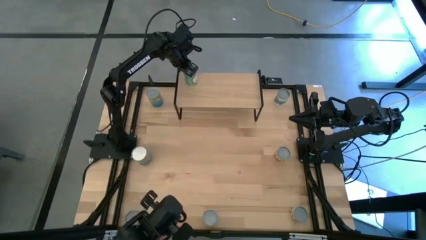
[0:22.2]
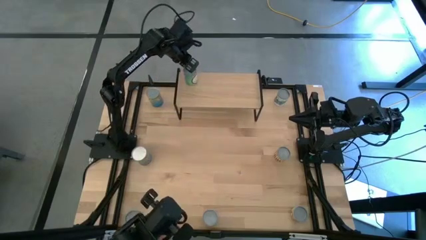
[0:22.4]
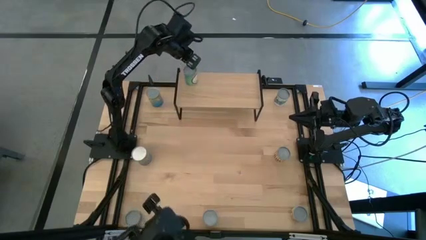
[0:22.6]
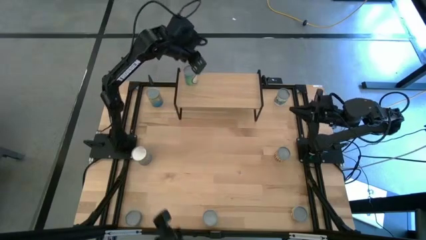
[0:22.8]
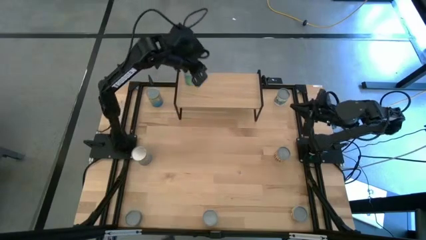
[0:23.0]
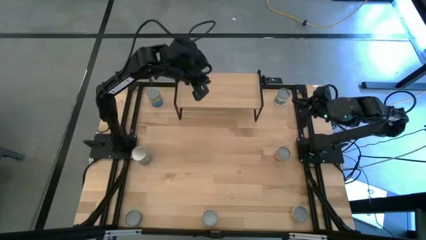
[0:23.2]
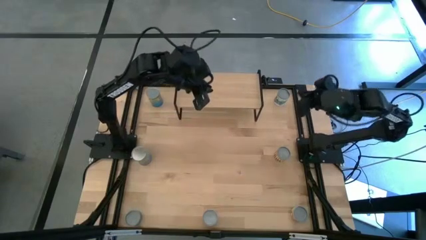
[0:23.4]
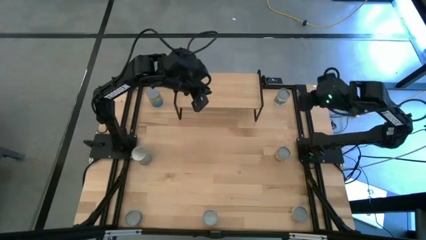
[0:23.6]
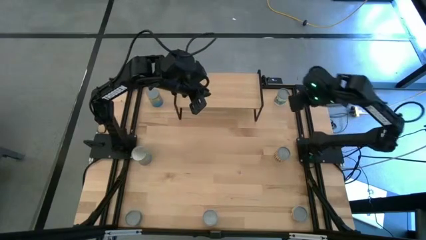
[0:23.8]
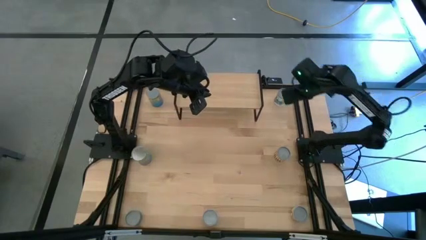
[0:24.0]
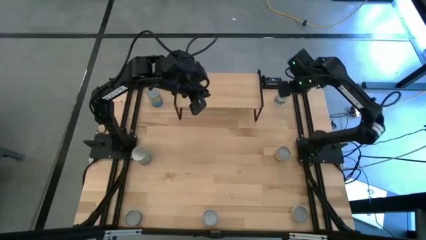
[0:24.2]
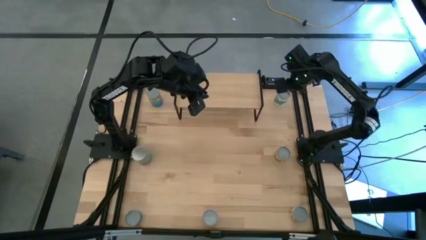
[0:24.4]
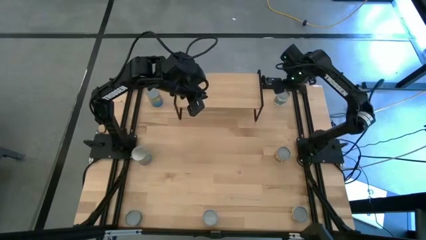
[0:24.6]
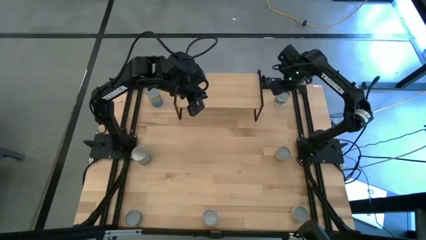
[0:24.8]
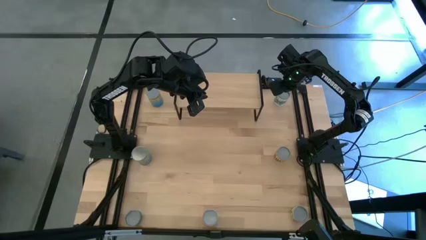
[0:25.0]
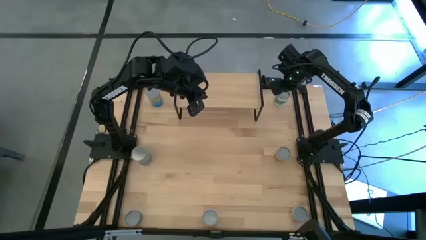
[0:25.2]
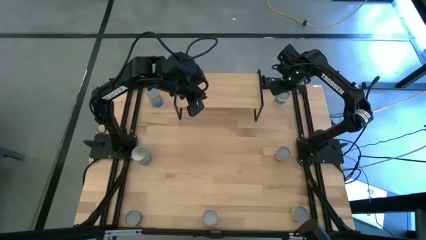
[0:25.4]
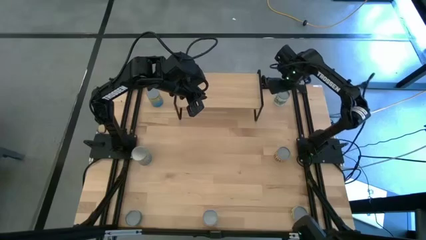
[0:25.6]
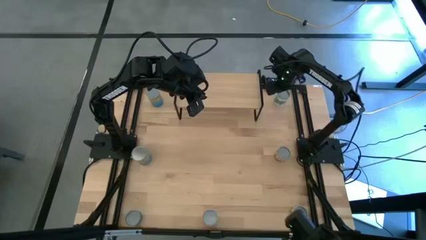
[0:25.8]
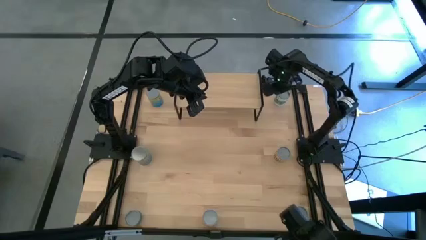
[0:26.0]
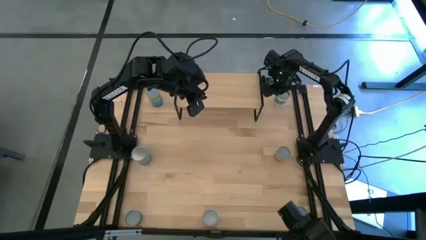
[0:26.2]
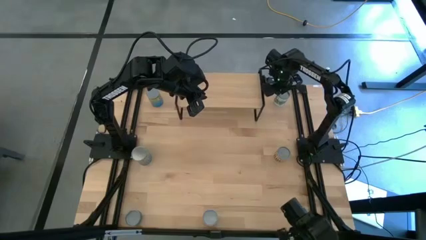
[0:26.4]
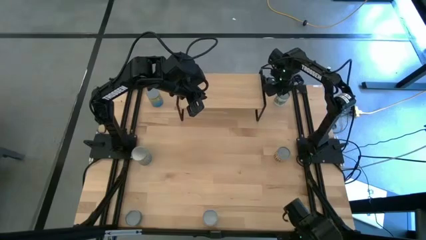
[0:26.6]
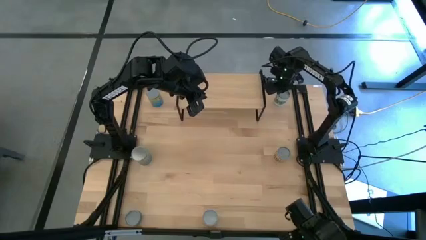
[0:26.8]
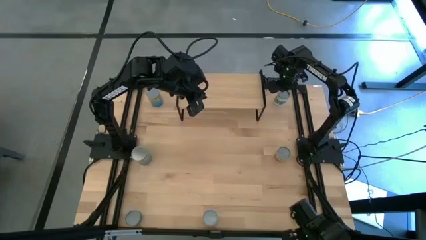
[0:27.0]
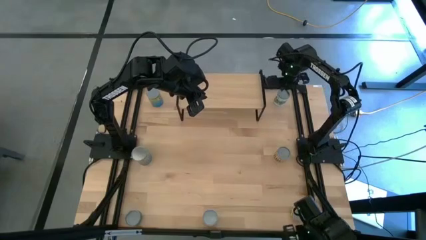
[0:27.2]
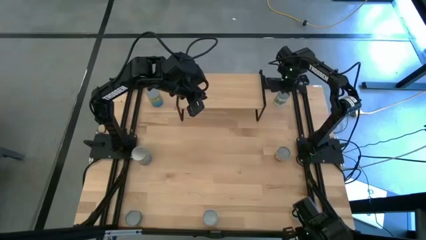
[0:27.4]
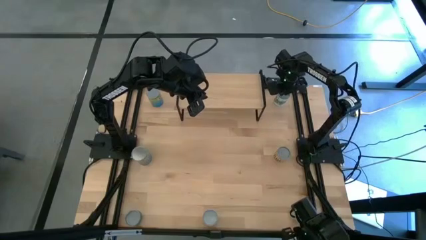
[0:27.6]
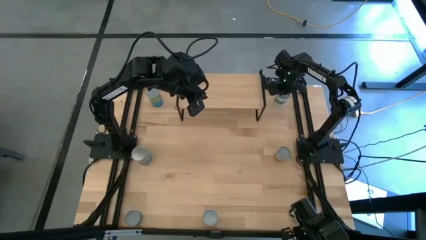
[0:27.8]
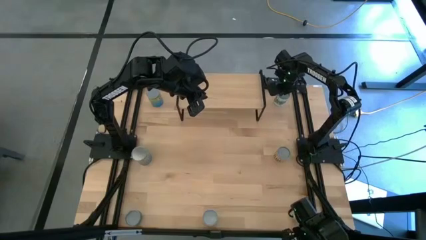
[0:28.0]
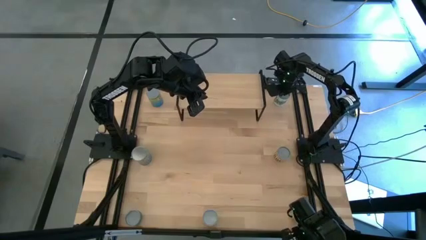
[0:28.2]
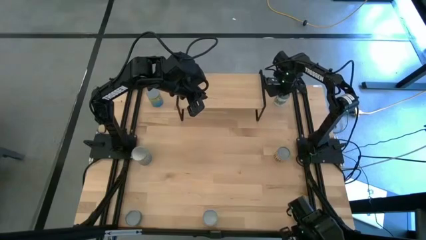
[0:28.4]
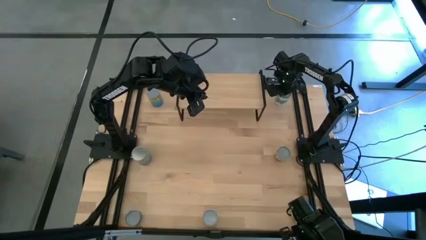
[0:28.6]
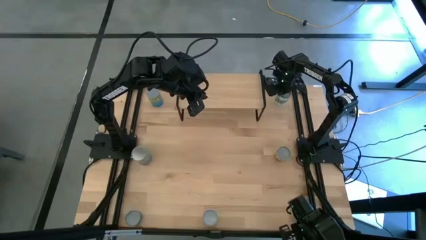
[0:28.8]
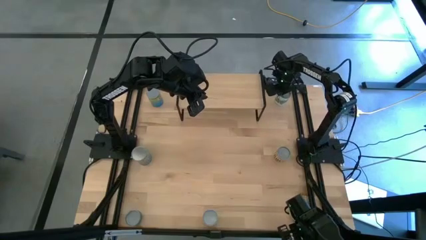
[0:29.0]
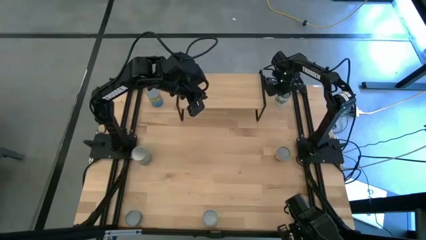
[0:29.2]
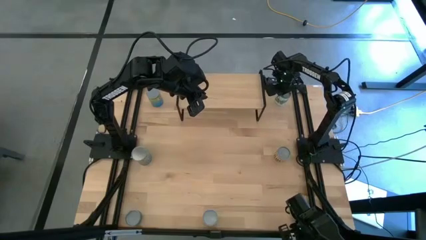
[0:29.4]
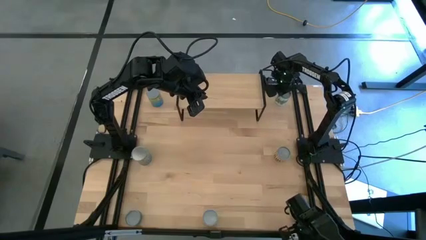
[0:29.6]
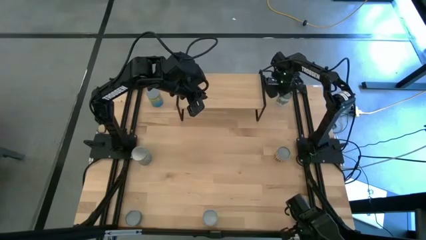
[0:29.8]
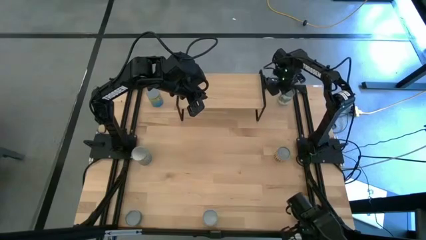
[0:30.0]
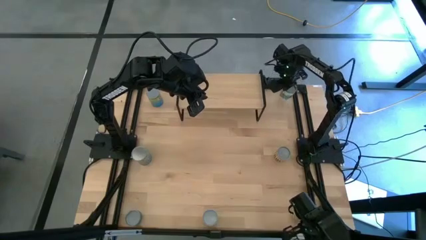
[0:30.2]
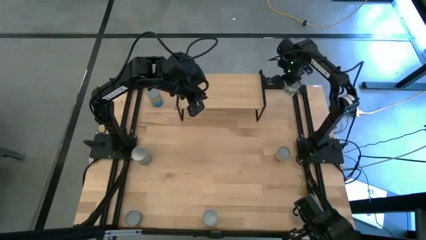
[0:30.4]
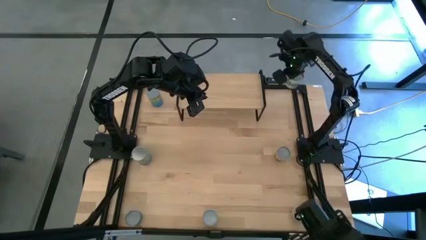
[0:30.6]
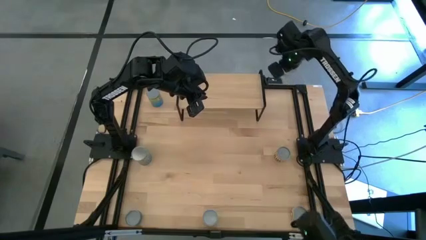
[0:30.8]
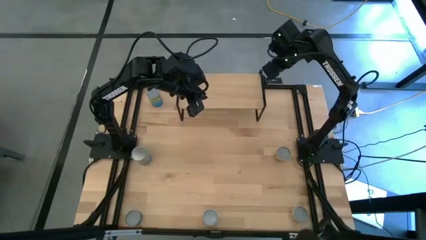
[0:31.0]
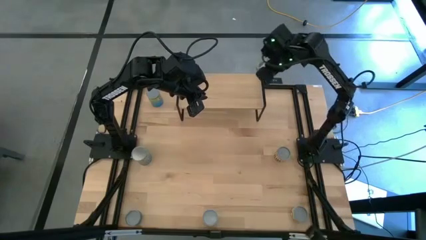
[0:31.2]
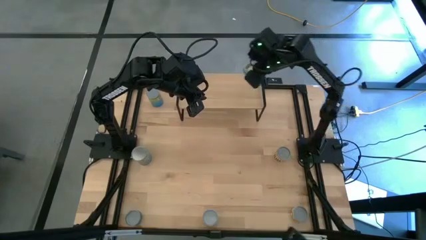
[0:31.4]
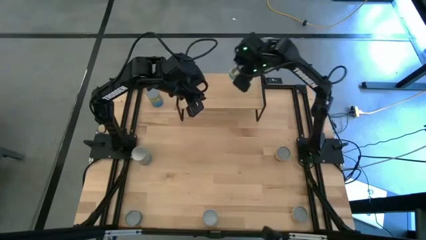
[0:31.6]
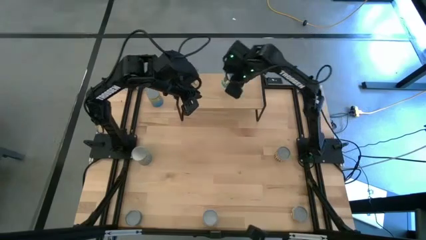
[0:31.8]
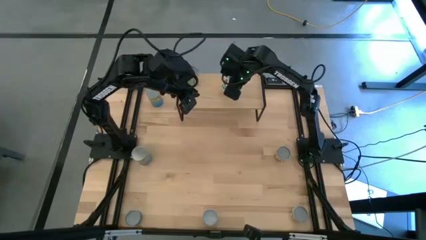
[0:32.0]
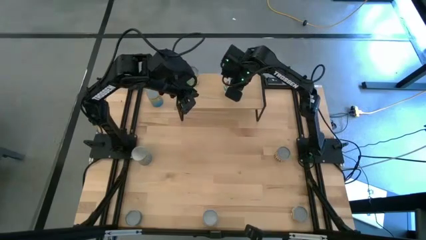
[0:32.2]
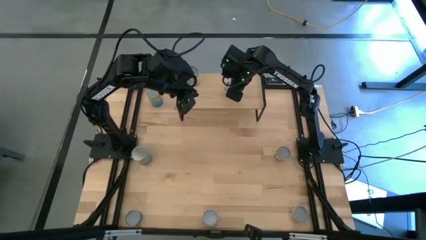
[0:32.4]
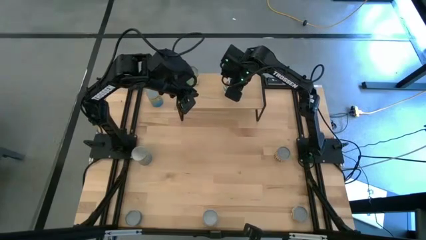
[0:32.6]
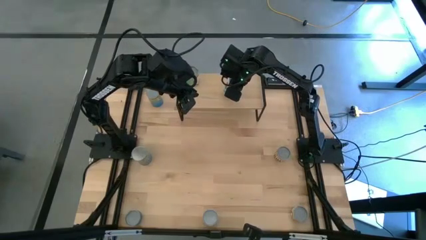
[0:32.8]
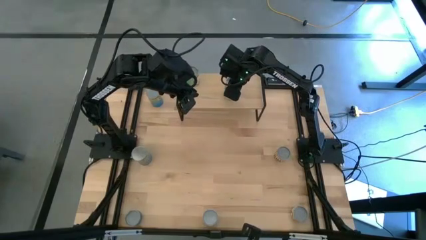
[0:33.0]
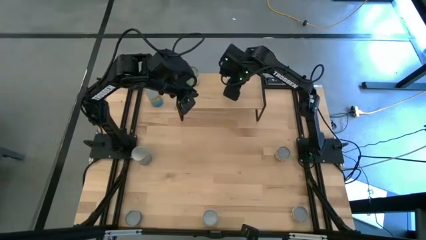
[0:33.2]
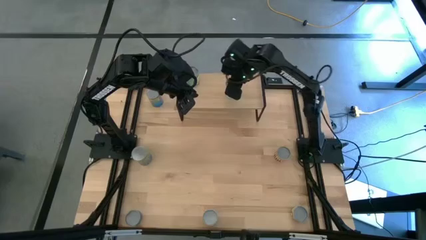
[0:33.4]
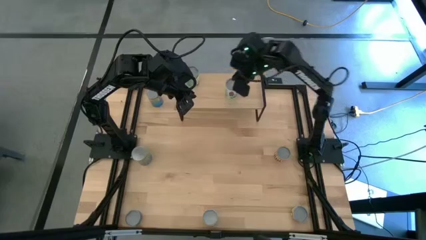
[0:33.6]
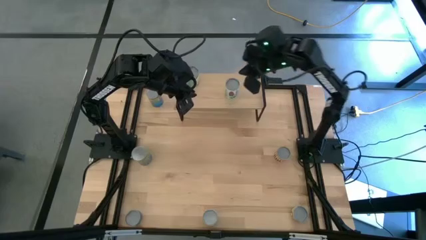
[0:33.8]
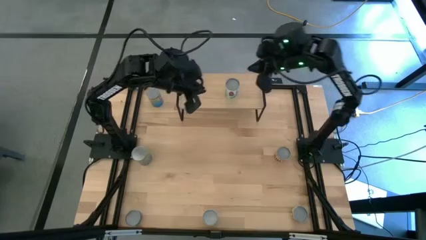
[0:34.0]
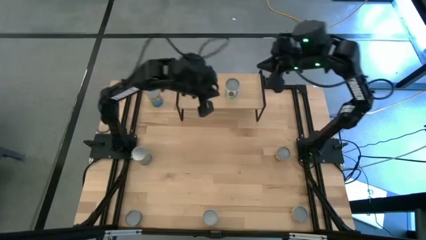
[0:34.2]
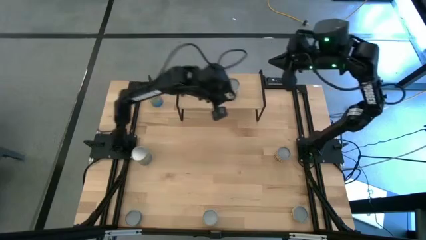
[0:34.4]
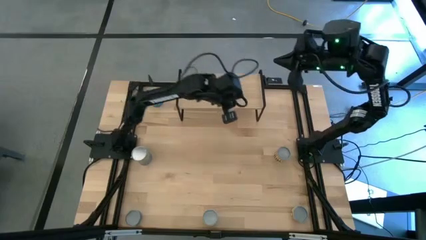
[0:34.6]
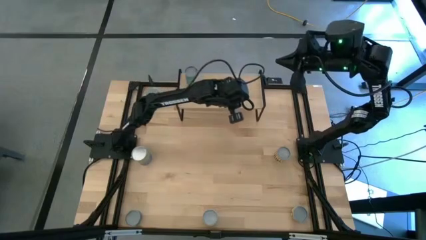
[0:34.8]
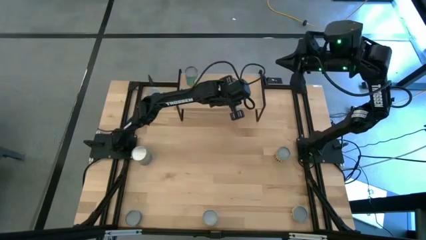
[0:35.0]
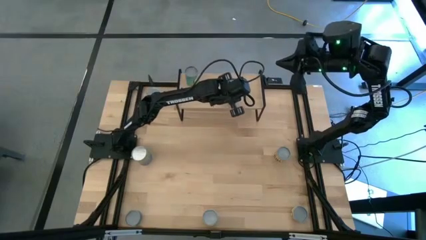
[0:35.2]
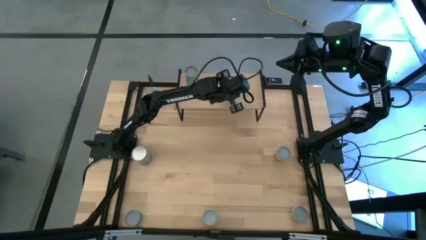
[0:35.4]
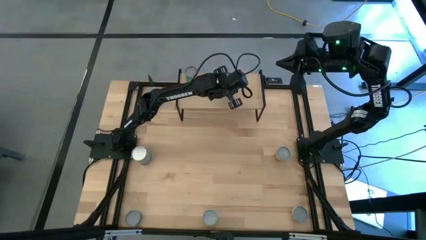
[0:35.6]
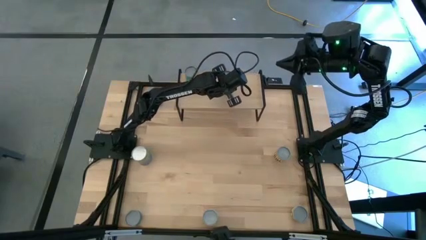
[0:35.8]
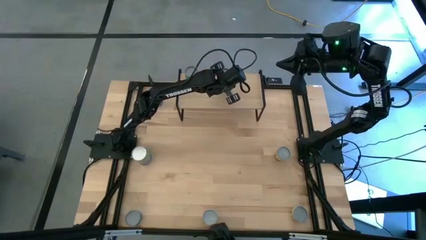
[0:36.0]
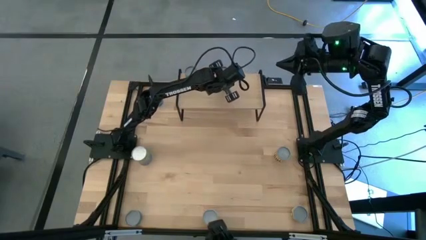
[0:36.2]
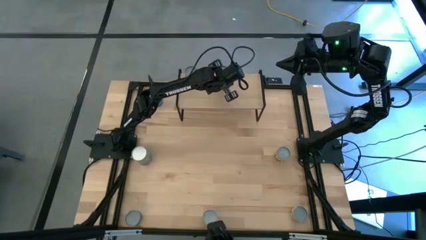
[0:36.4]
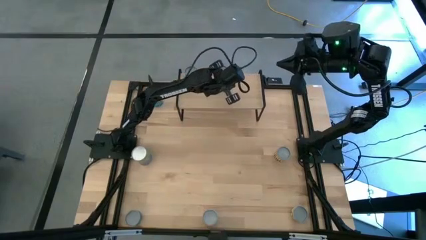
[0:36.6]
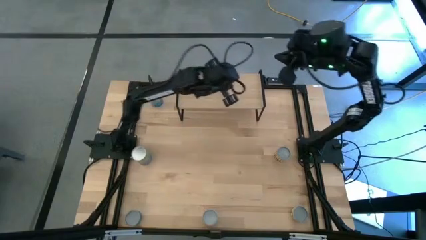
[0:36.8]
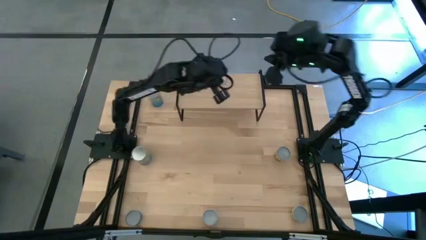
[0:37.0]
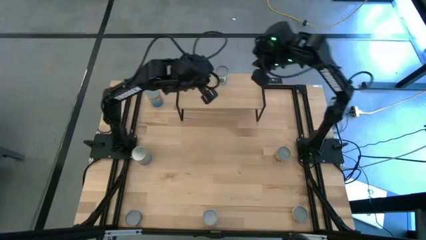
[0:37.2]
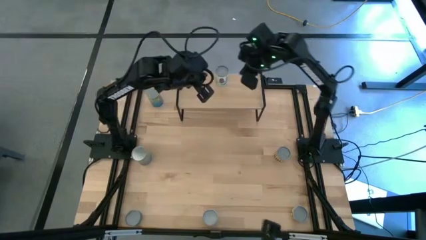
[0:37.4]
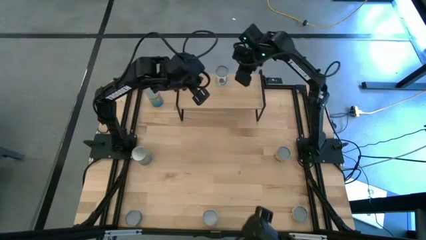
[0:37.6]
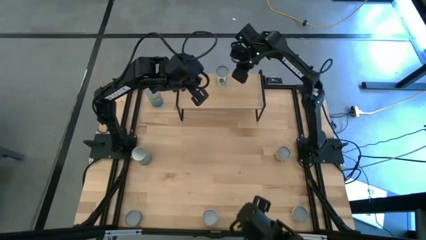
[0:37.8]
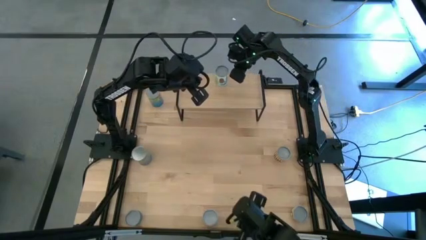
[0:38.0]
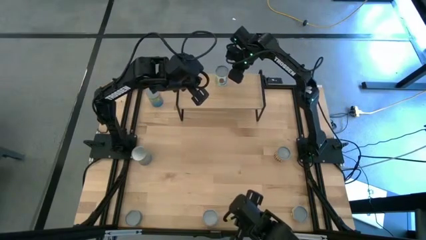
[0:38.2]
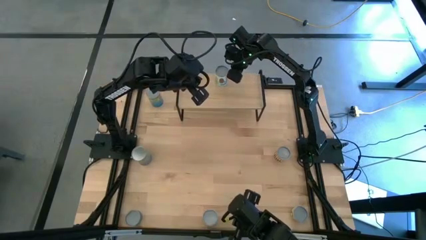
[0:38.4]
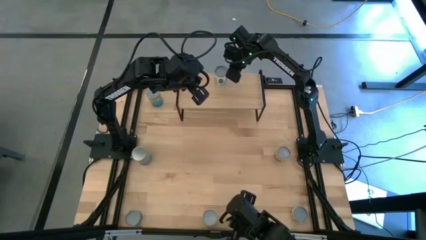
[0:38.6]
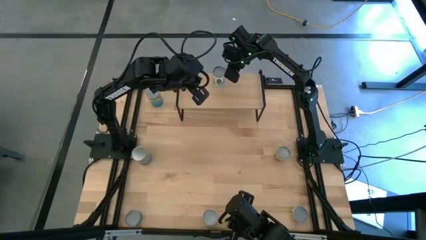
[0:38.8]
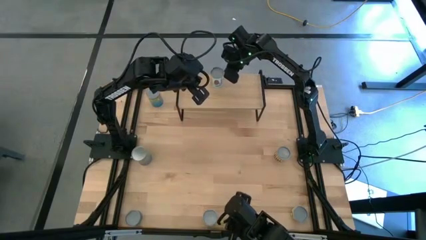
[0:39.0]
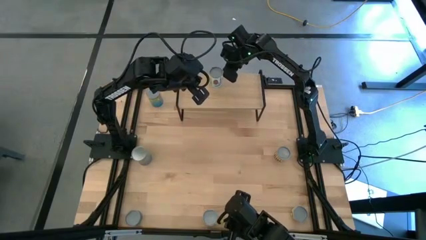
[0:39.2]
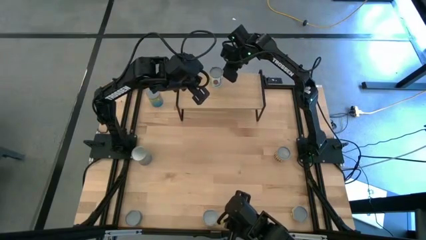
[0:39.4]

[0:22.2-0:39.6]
Task: Pick and place cans onto a shelf
Put the canned mixed vegetable on the shelf
